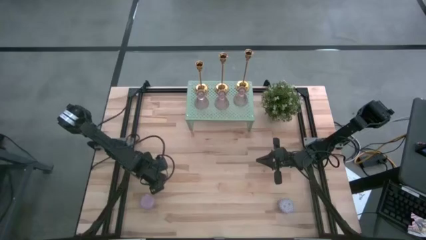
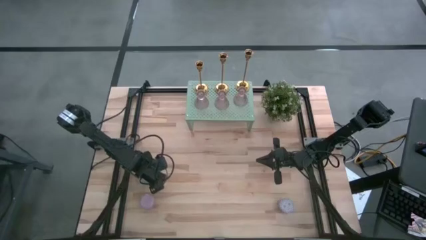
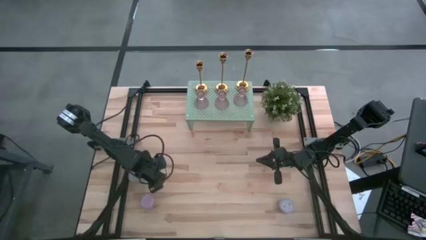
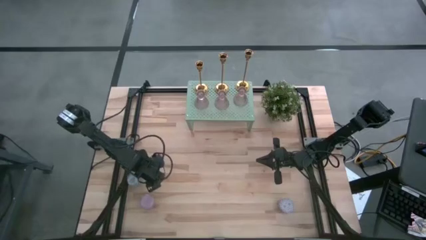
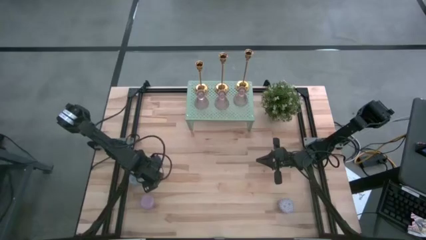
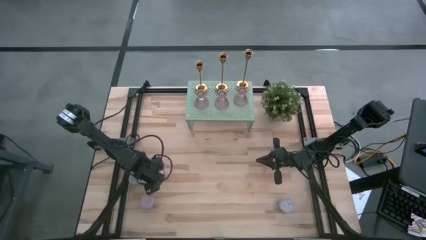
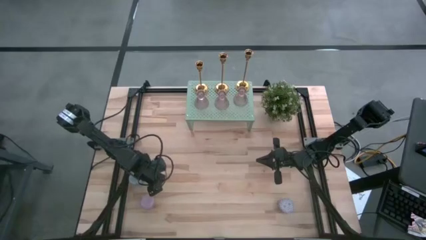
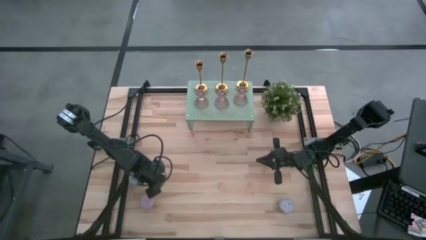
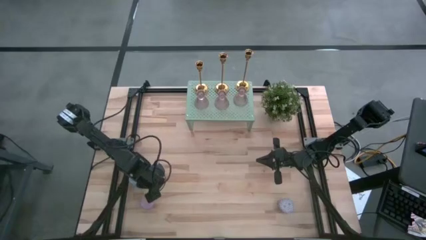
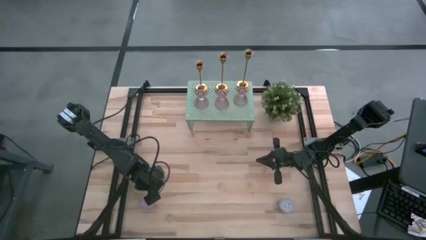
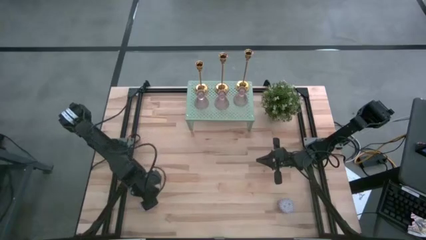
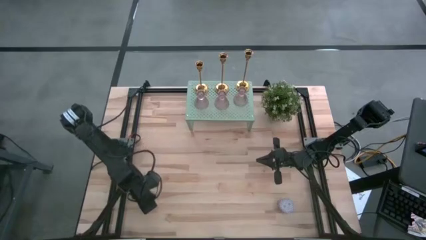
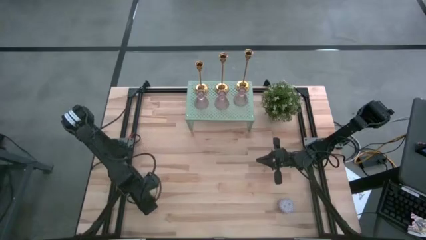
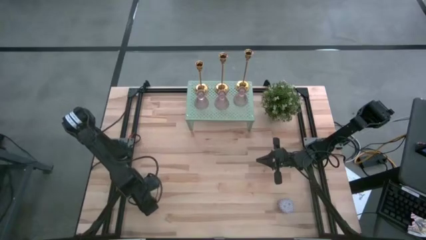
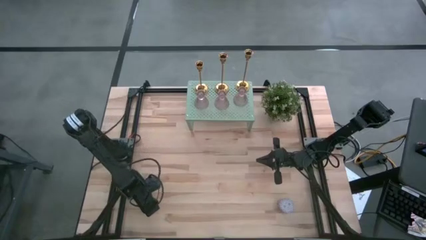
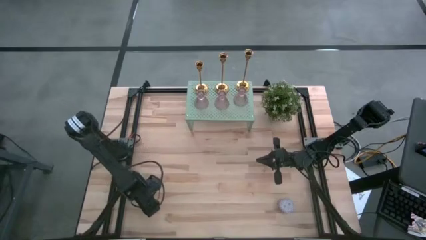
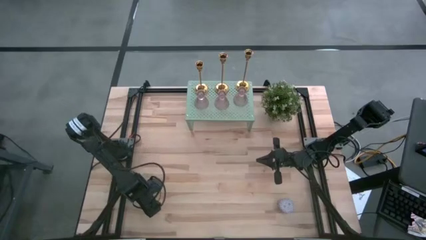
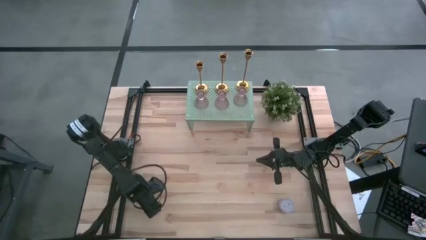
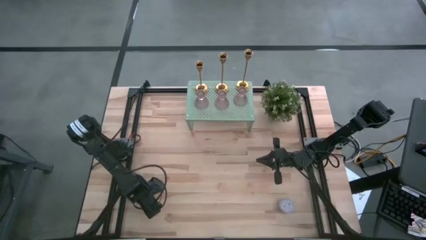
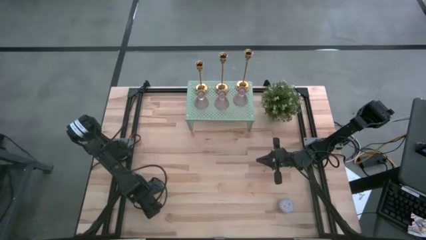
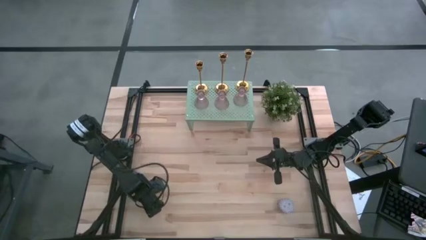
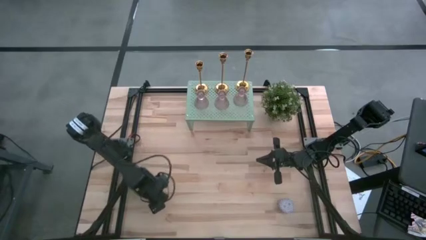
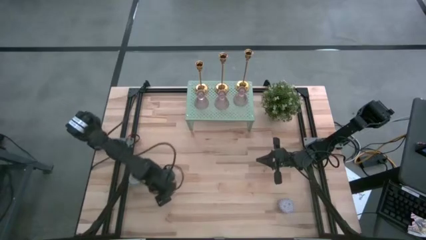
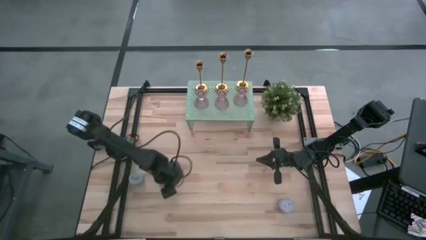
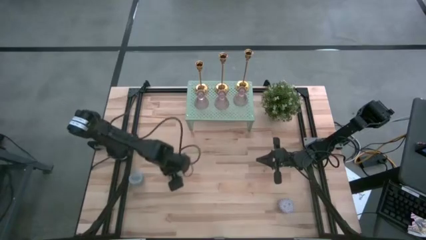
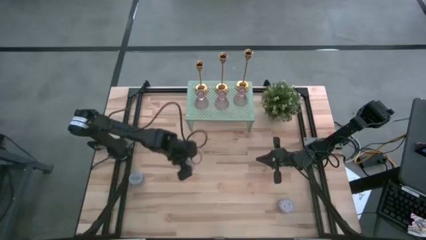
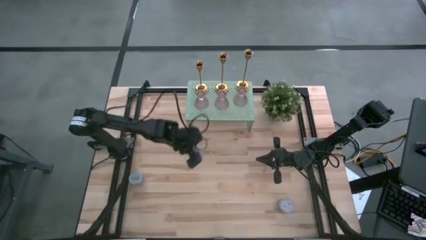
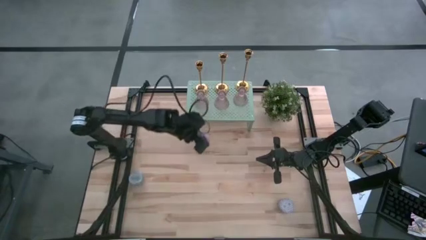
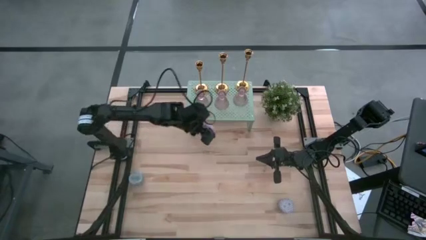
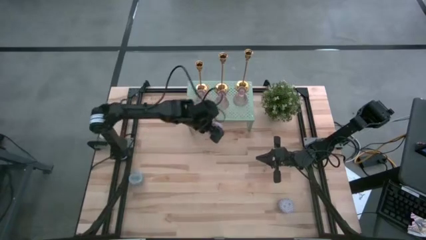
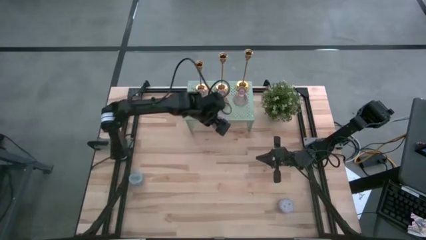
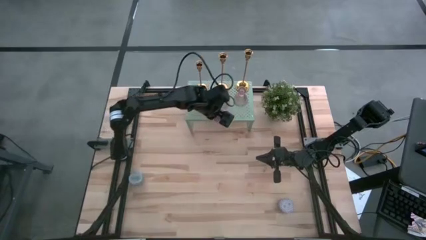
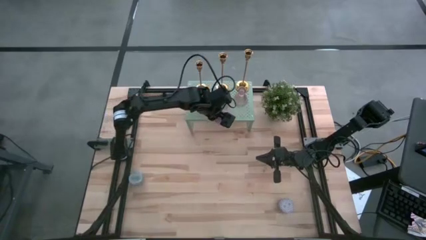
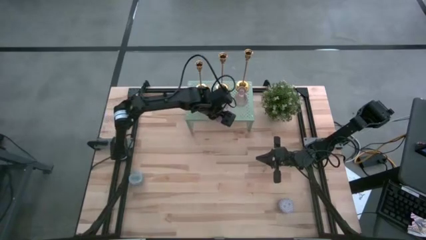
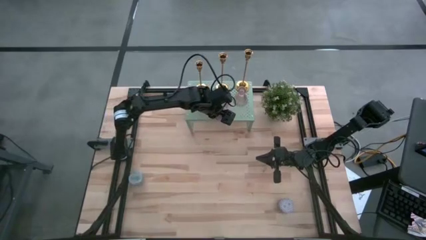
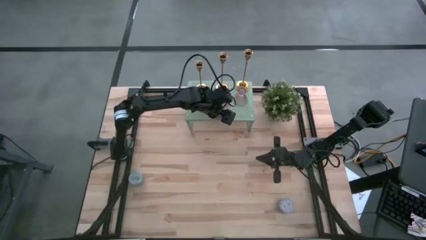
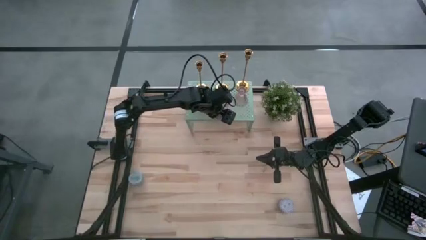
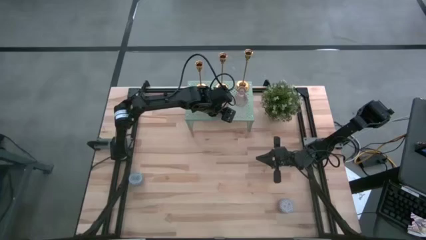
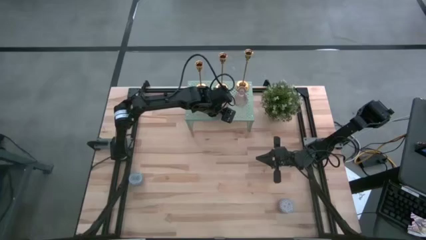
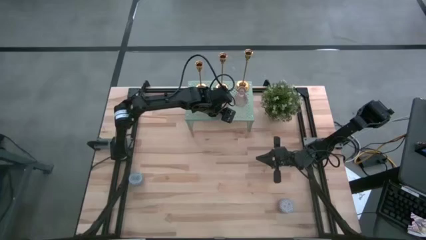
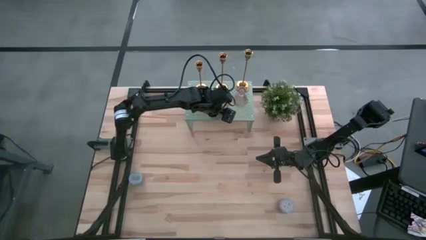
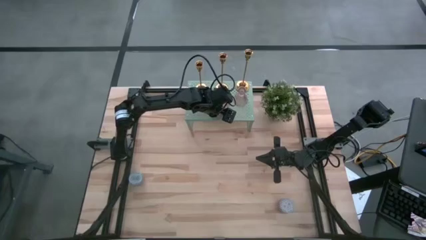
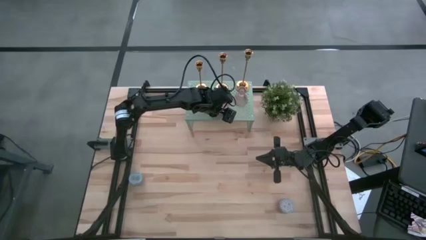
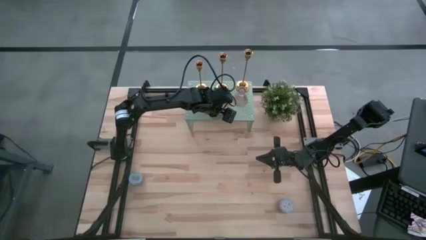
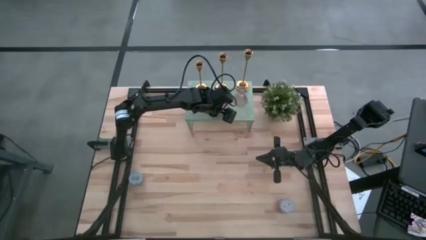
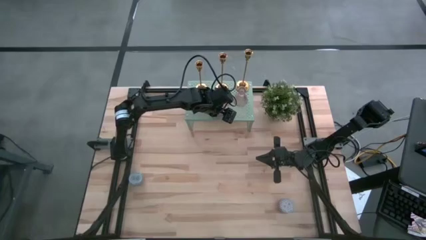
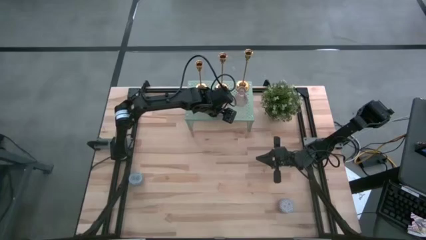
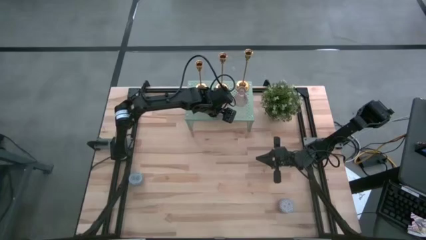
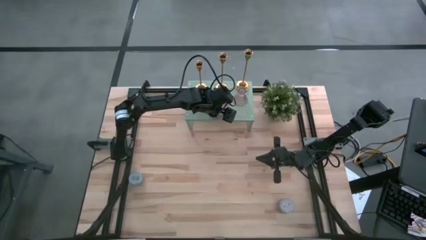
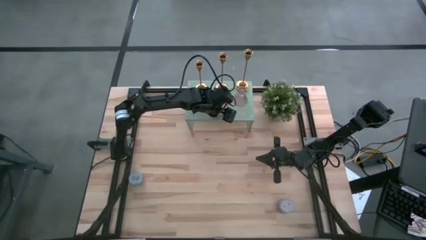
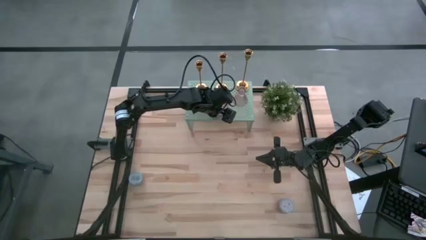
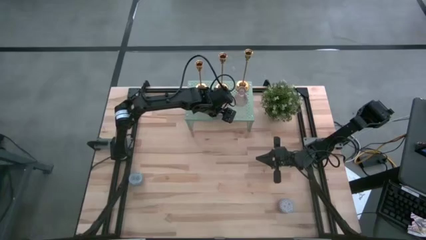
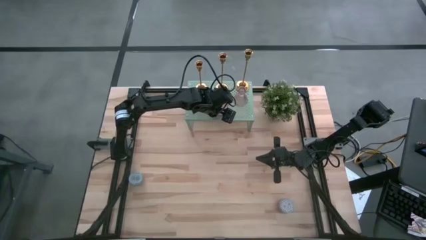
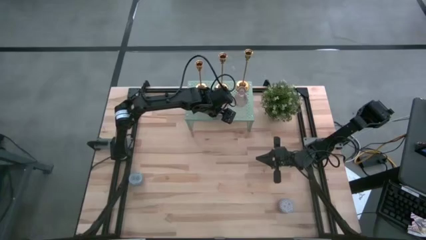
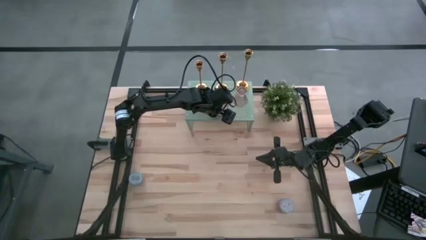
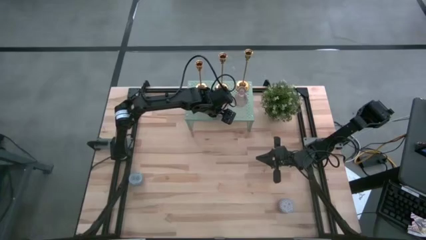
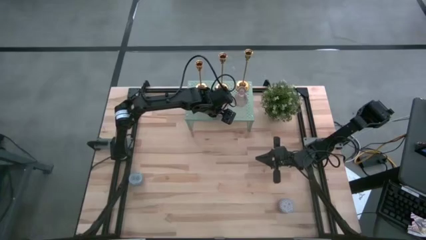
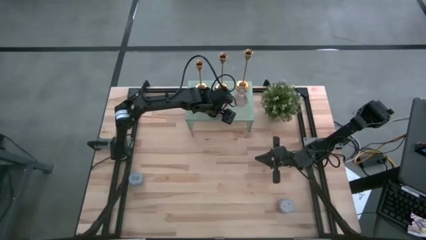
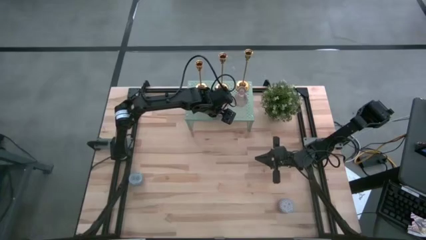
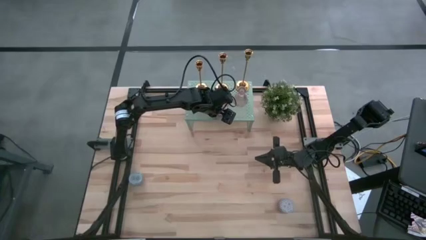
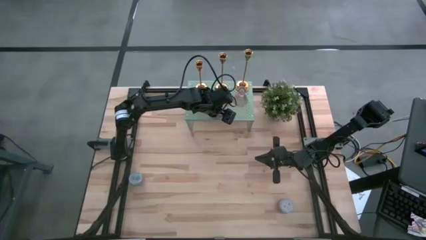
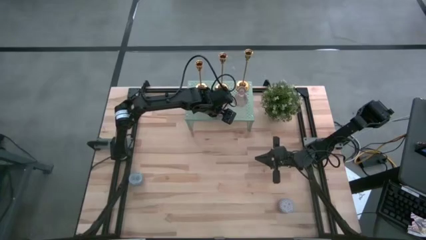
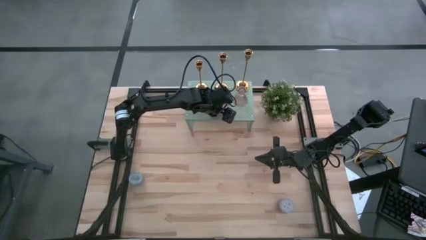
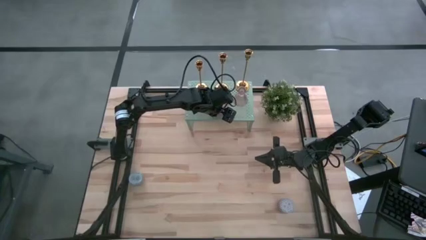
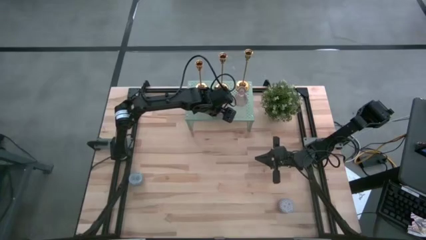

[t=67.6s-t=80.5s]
Task: Pick & Place candle stick holders
Put the pink patterned scented candle on the shelf
